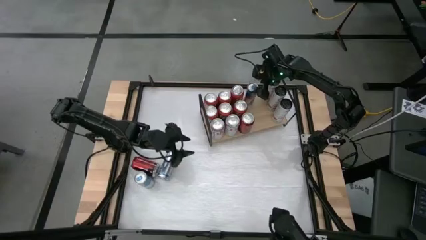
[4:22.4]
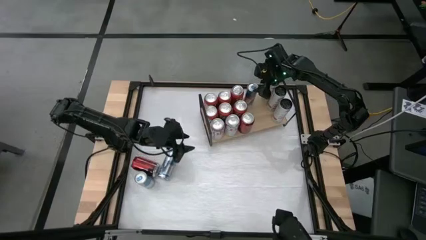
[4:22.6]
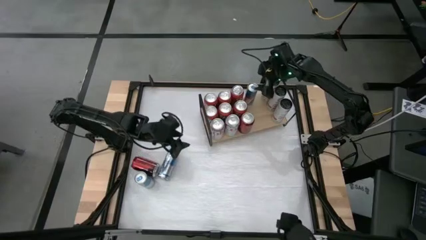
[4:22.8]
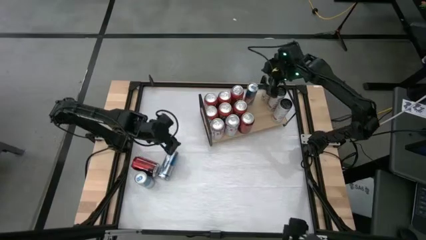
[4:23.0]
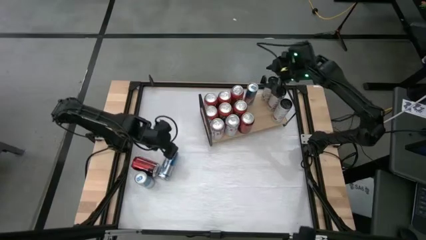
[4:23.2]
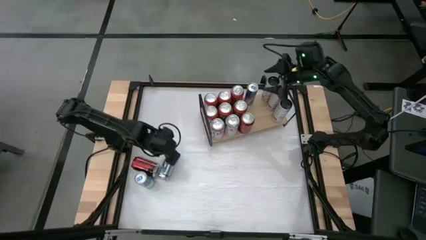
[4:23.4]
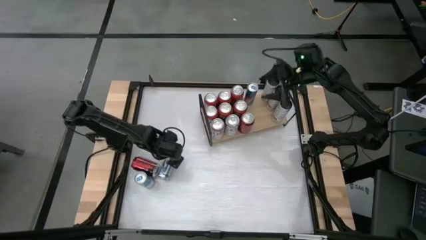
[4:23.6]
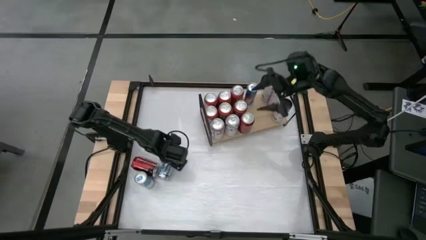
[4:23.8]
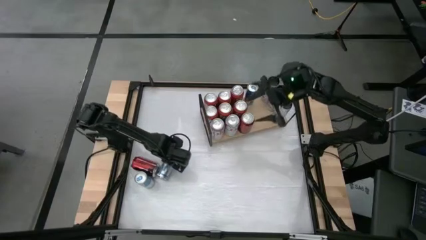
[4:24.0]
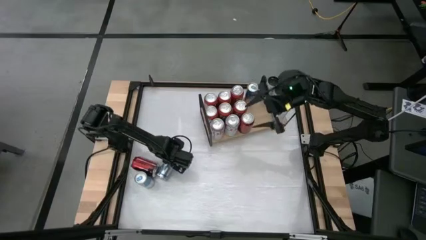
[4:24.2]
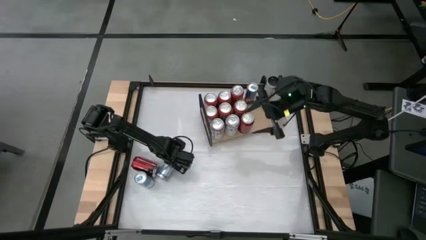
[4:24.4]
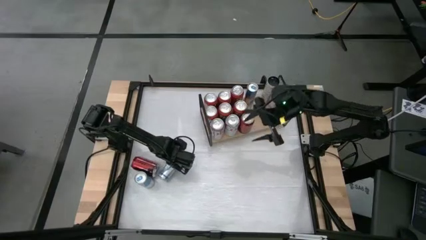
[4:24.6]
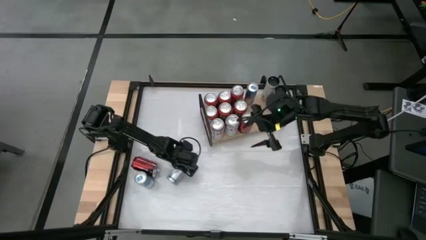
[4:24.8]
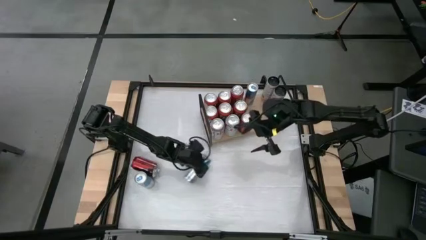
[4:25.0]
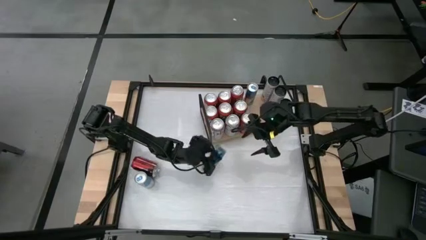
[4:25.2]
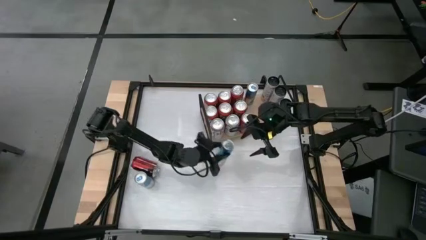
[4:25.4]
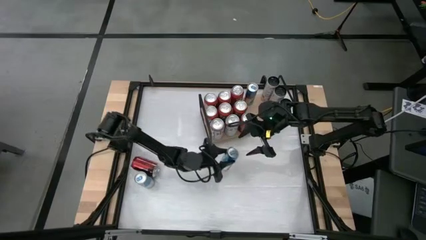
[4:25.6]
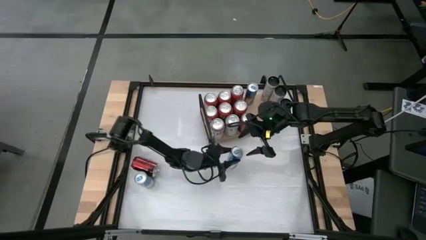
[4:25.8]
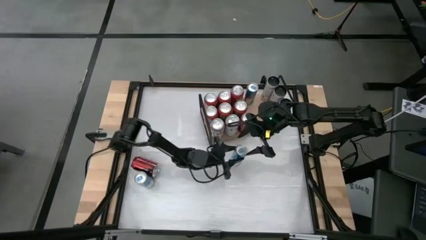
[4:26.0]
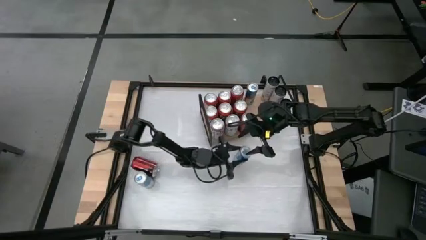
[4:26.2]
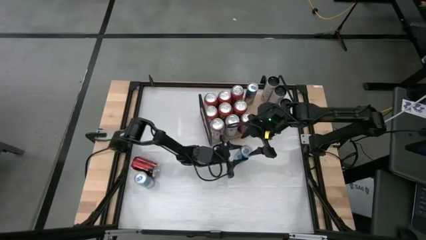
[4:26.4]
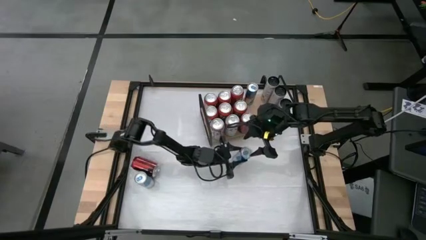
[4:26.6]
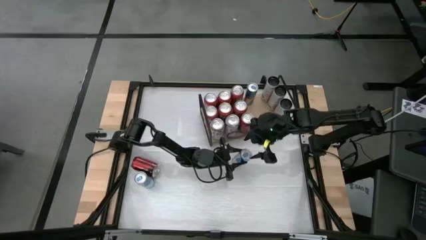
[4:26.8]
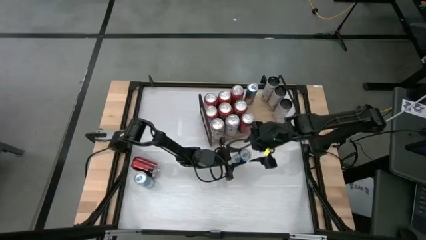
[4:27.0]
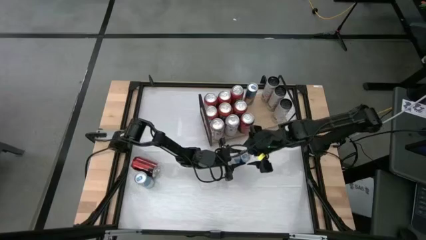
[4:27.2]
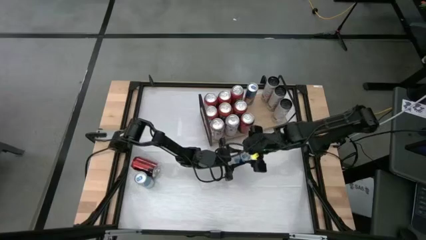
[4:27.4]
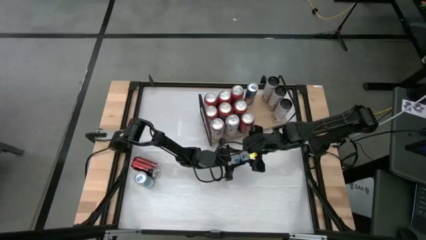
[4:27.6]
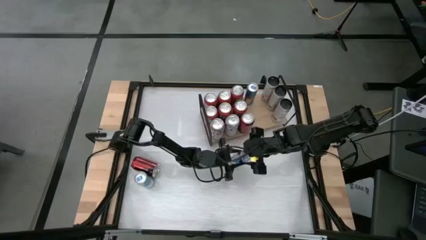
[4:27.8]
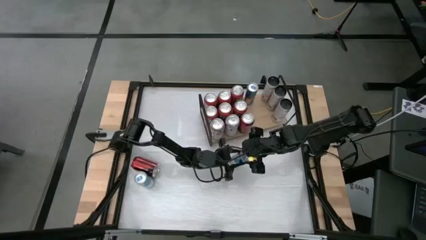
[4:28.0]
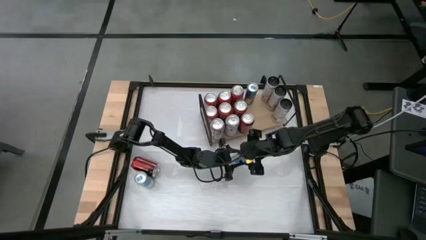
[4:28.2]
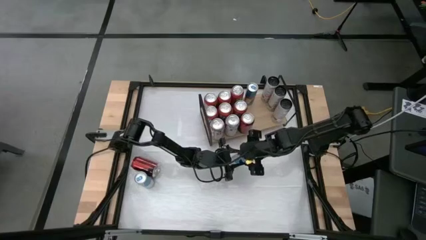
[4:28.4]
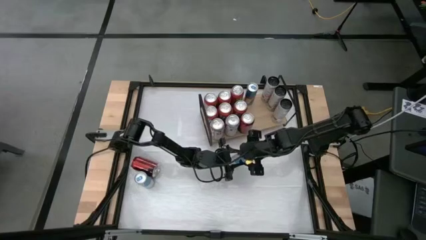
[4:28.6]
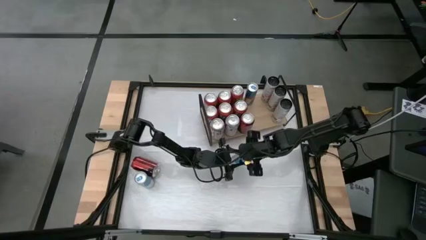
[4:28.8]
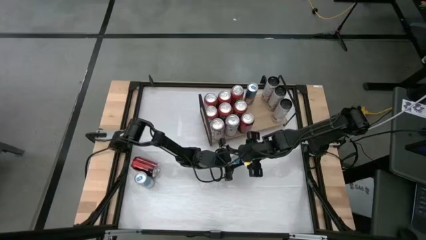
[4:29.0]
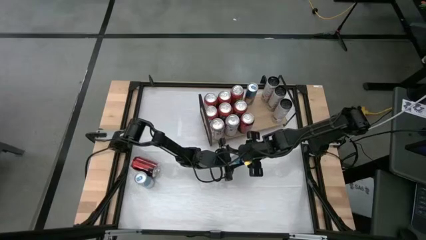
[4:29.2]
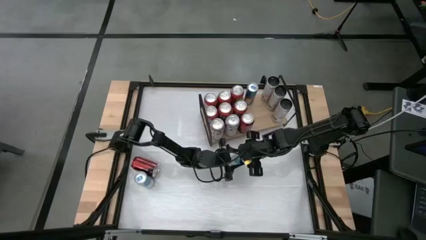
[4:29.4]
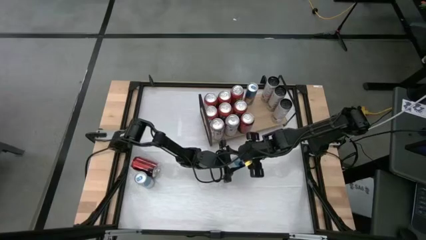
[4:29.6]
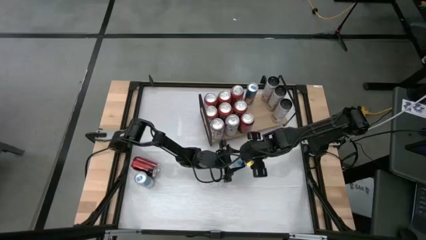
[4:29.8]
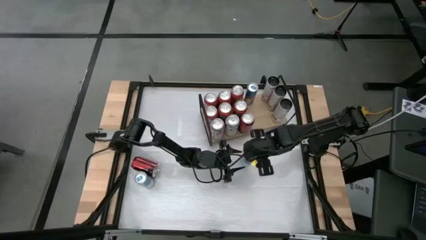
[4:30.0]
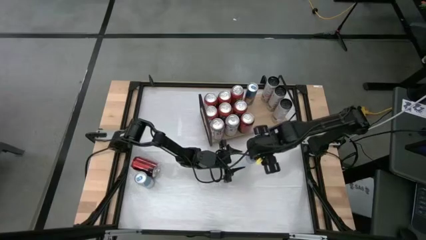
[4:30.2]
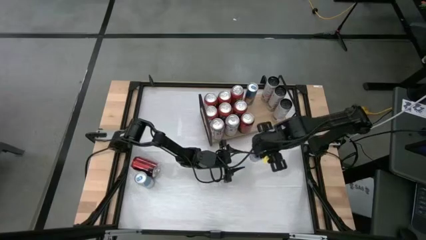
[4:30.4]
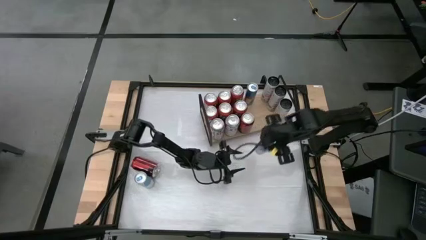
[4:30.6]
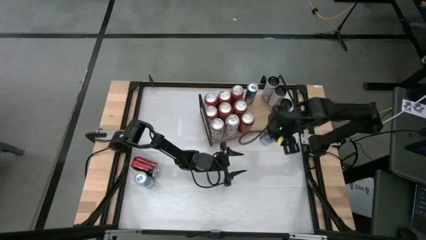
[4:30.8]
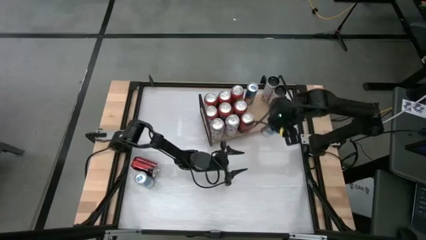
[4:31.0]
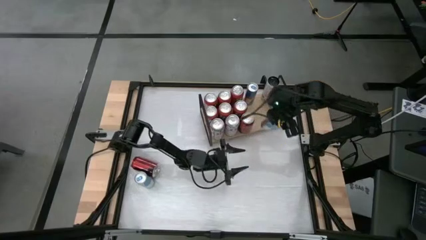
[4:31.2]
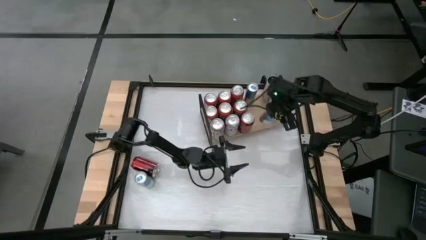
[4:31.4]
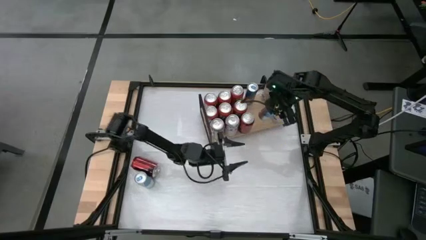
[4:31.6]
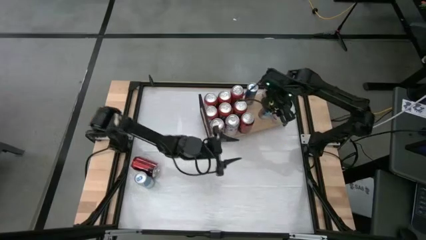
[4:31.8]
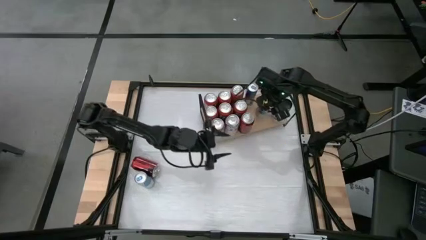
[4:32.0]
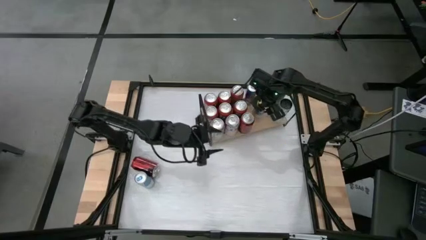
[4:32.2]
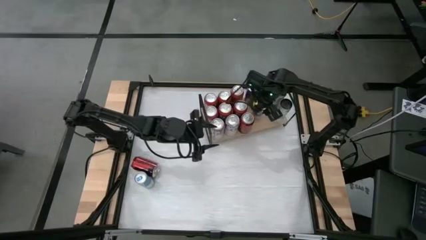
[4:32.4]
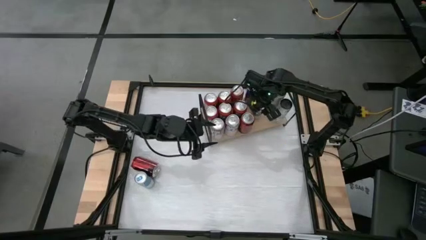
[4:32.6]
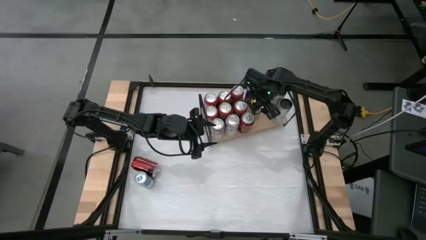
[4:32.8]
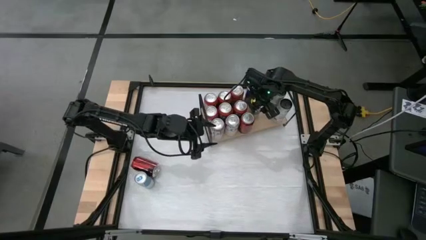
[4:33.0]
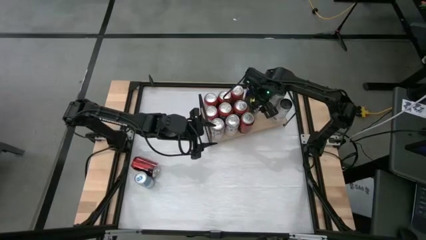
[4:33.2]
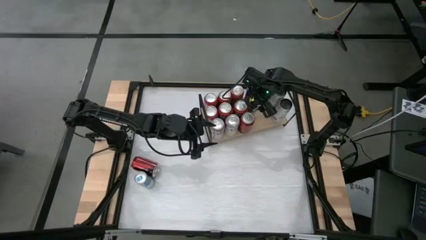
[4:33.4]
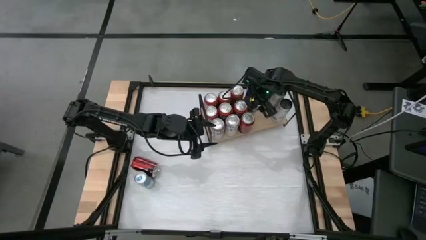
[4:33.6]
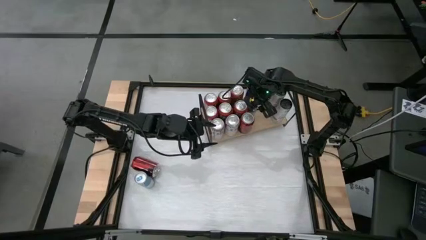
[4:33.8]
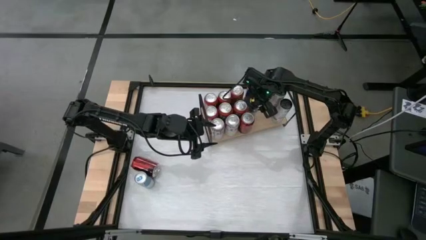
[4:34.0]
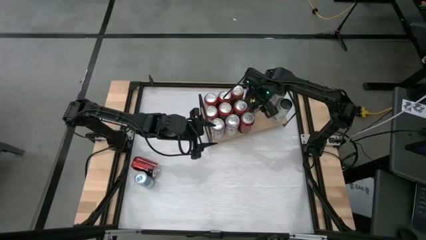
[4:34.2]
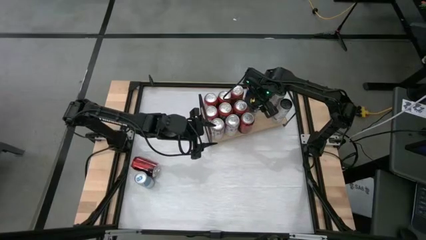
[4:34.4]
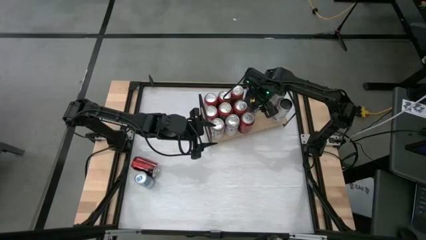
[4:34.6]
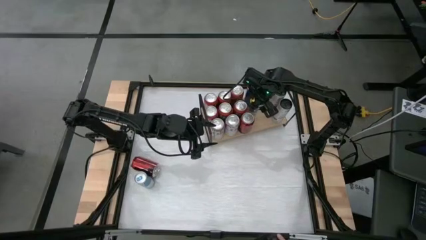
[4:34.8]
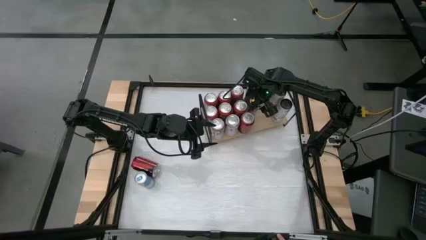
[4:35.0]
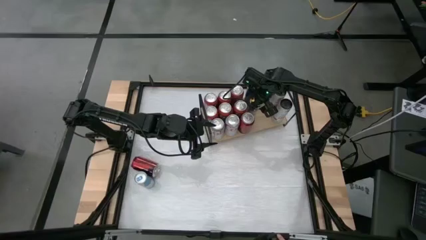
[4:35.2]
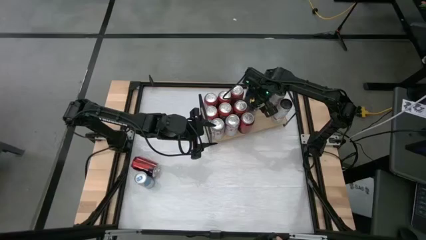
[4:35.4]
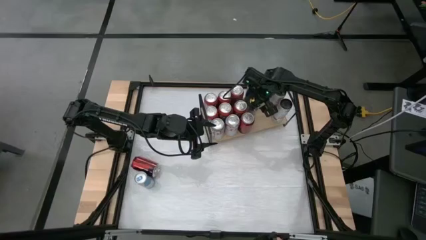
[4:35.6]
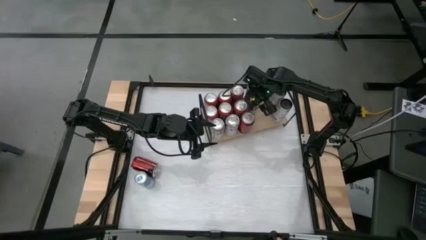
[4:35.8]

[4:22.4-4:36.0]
Task: Place canned beverage on shelf
Put the middle blue soda can on the shelf
